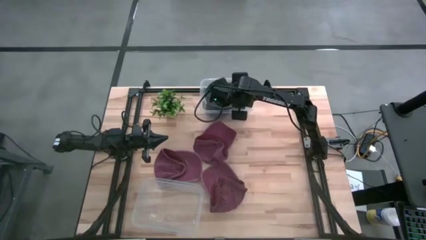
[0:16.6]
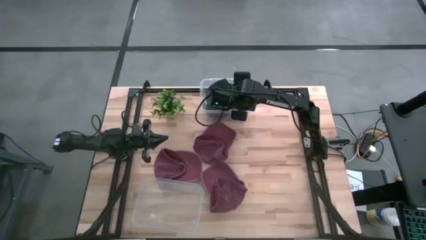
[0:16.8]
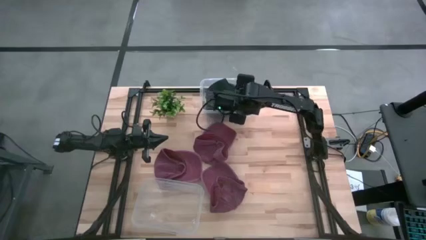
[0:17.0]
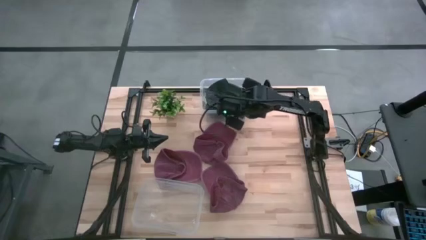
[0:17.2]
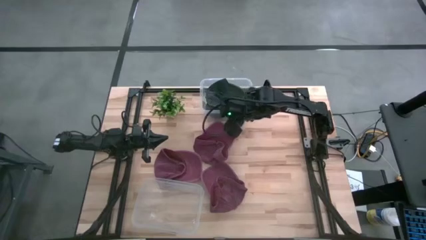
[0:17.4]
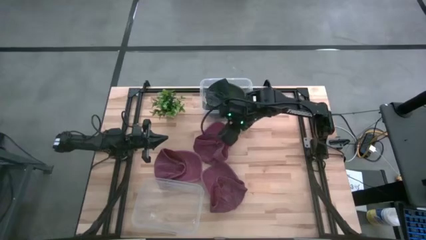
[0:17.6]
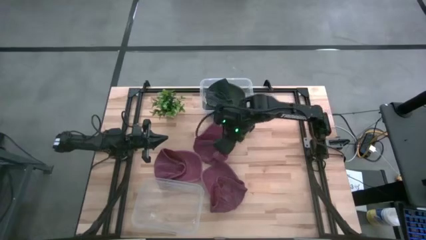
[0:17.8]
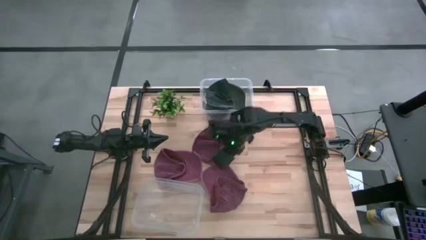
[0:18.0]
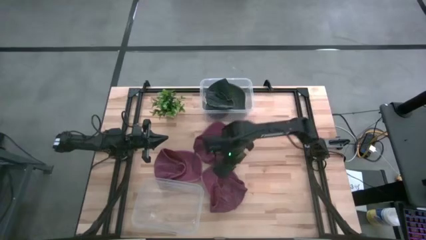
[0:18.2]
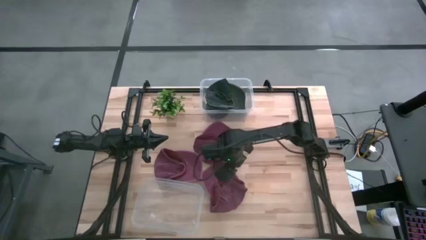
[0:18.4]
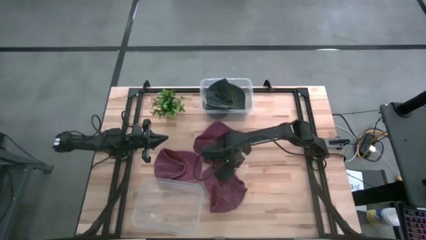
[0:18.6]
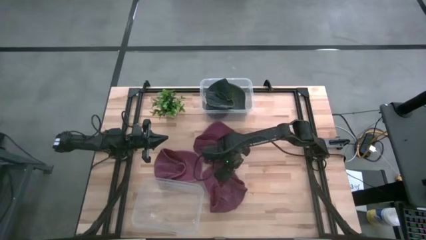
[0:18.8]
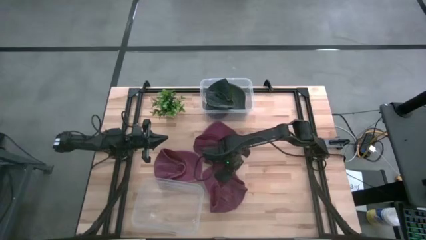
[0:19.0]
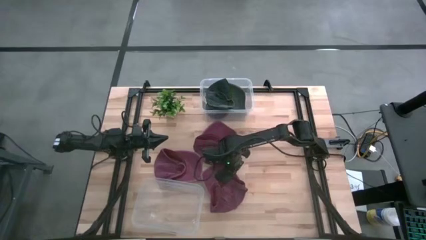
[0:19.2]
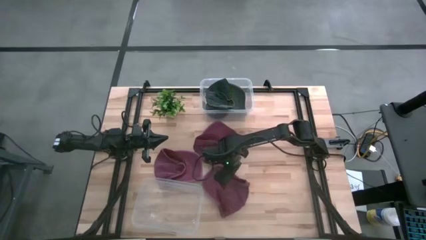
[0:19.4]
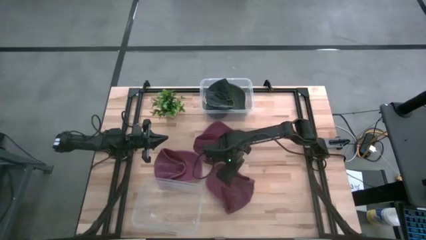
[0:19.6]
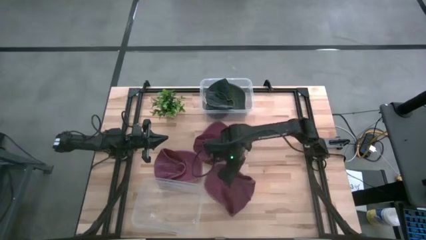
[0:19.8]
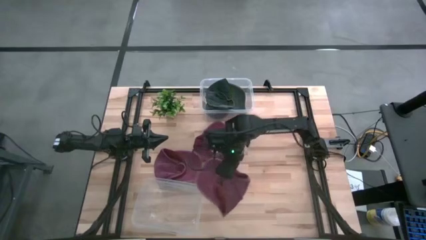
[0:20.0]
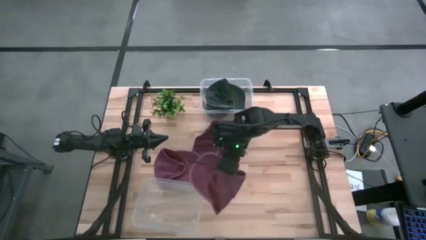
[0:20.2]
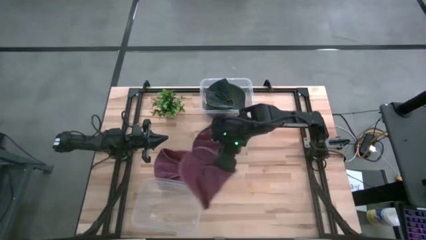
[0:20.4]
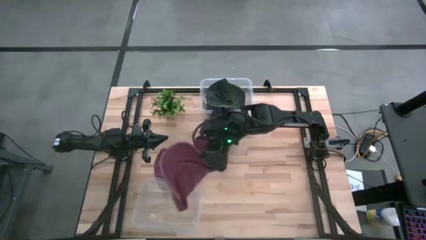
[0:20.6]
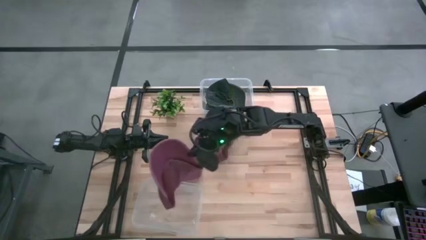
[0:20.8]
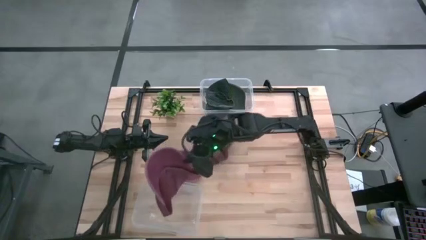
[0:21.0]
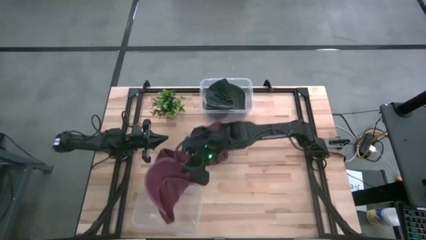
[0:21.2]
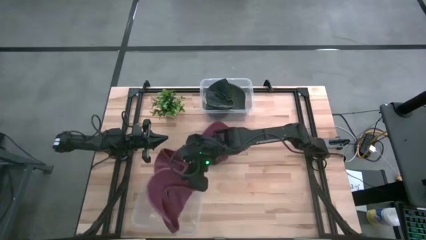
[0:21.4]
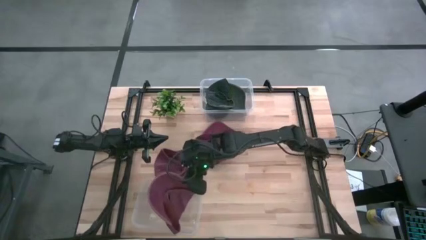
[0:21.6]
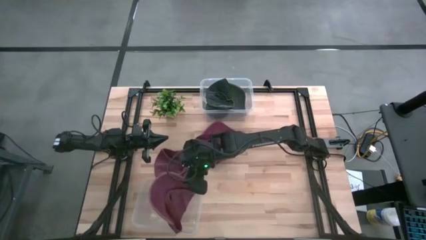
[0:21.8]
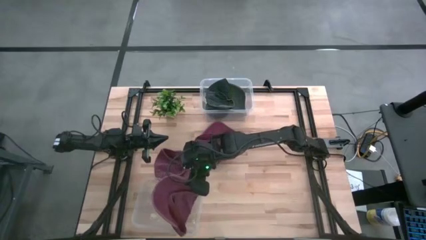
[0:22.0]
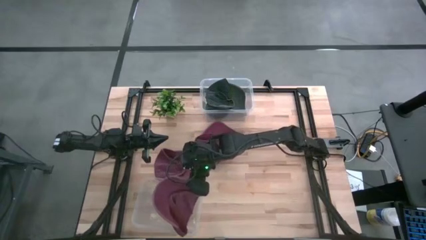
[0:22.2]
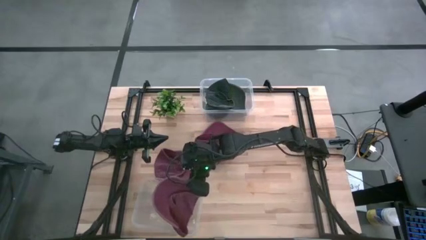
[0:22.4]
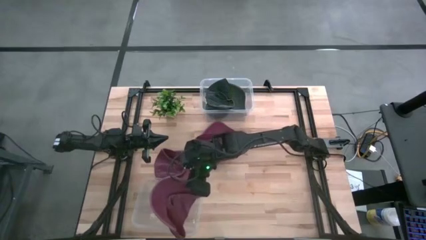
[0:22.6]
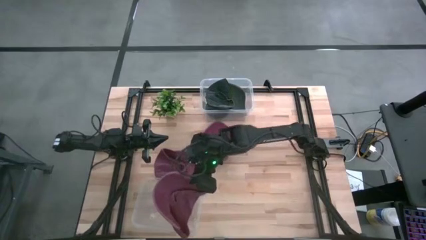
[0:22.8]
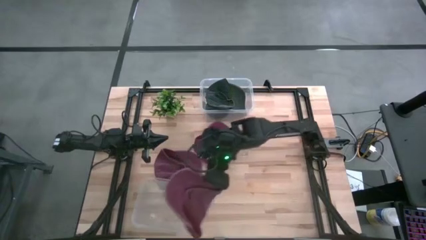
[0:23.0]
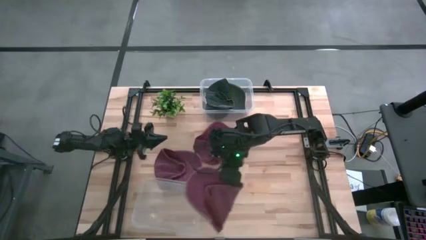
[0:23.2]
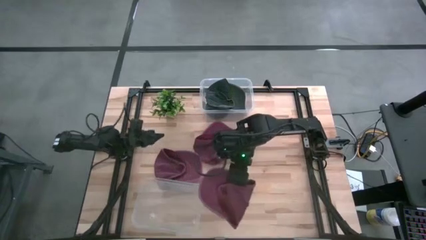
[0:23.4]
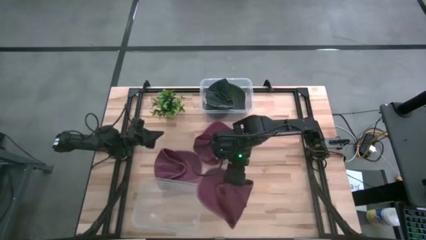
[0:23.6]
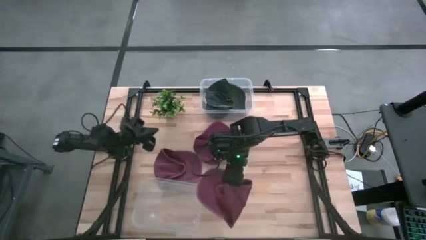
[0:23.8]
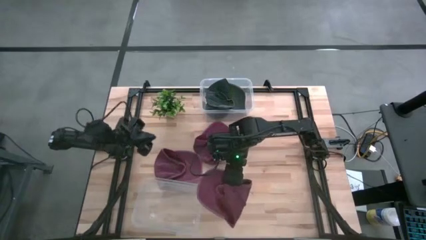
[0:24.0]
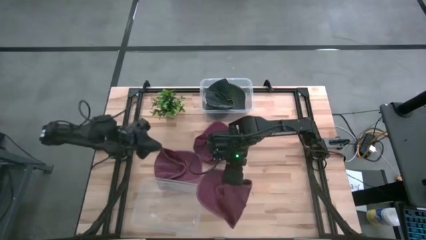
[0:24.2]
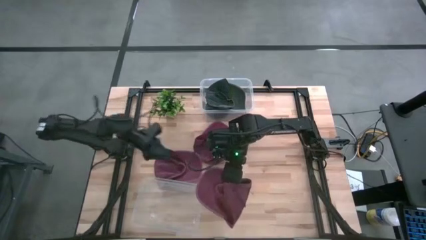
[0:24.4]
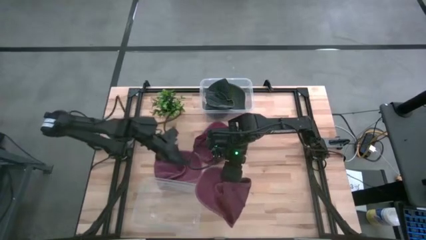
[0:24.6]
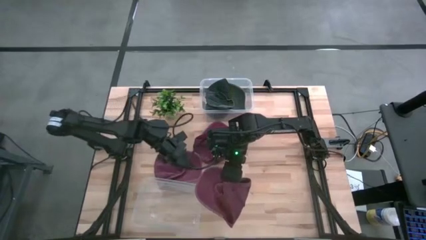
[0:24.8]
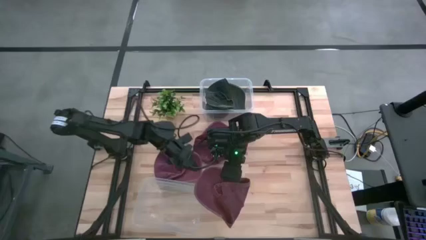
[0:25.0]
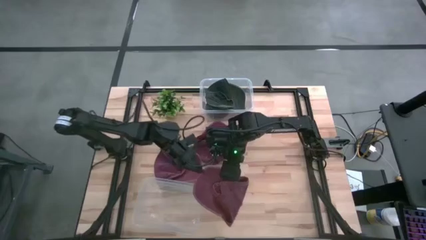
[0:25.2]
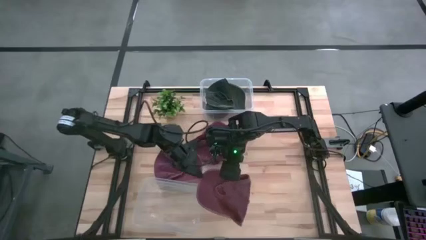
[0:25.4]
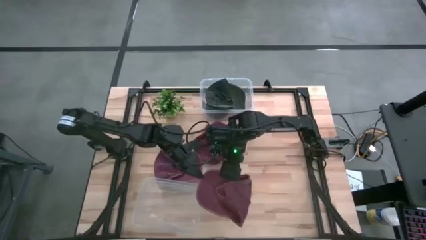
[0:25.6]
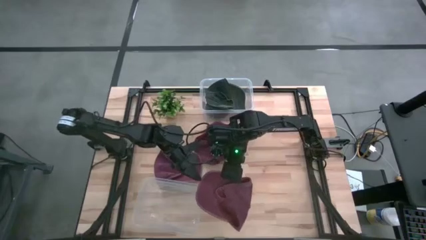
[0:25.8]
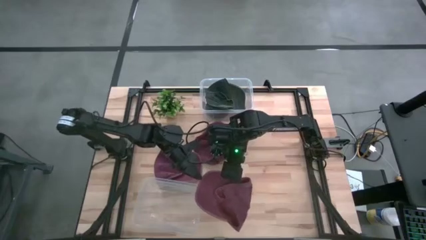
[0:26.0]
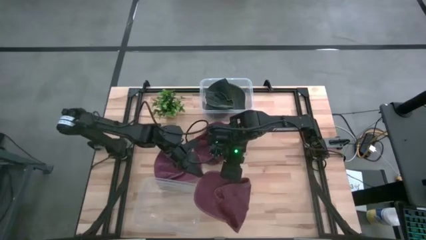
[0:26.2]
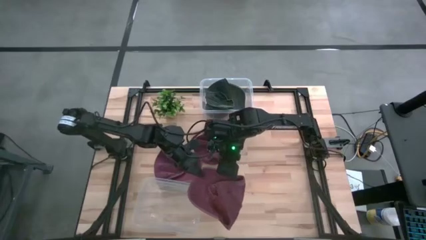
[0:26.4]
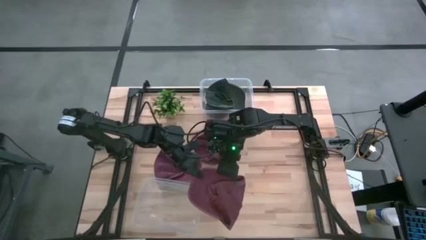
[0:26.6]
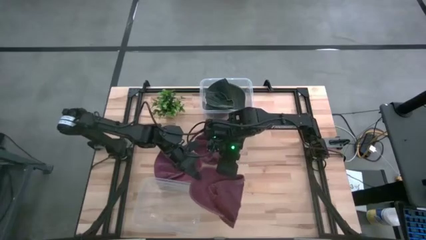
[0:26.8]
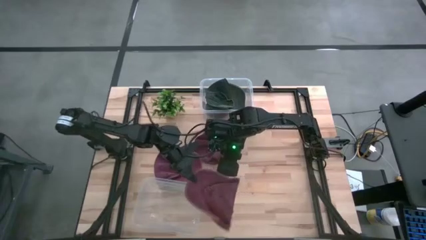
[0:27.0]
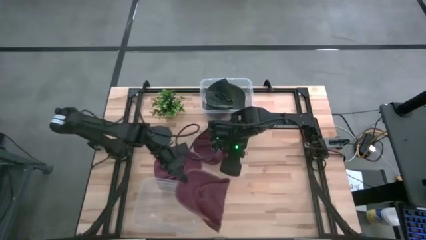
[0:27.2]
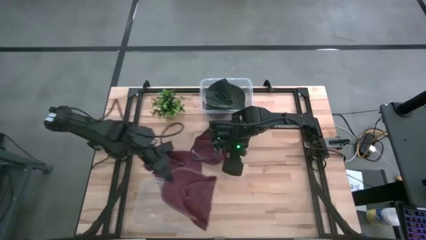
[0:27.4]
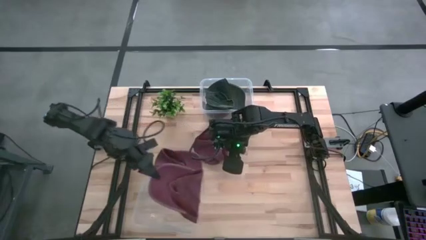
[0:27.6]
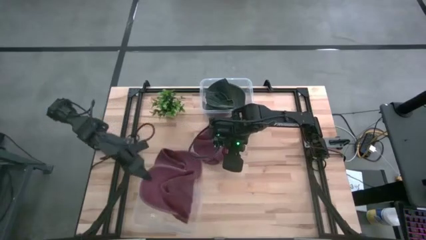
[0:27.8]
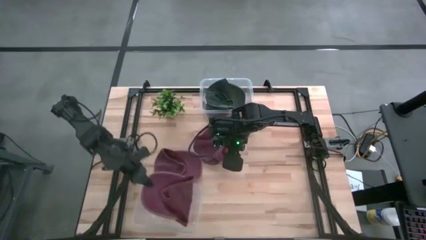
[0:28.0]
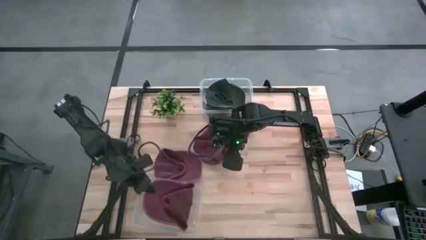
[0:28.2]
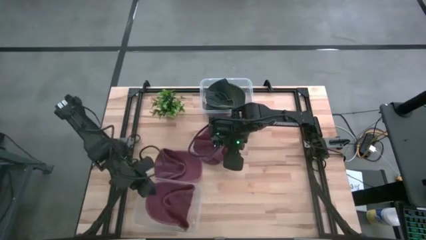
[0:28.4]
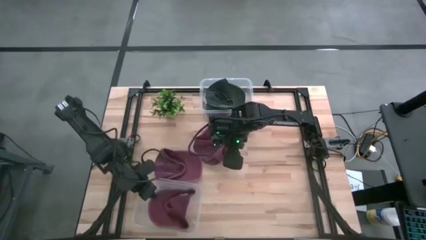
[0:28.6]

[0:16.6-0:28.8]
Task: Pick & Place hat
Put the bottom right red cap into the bottom transparent bin

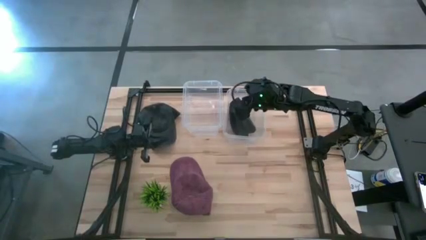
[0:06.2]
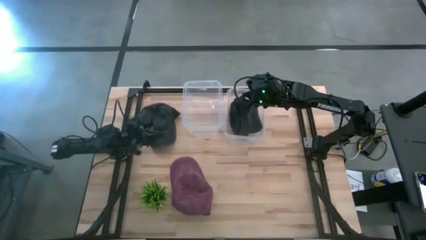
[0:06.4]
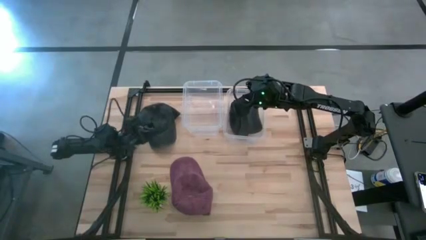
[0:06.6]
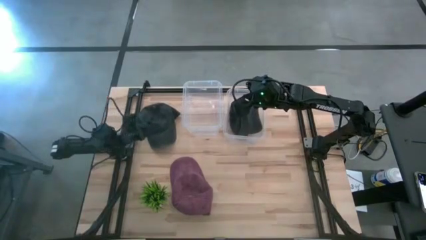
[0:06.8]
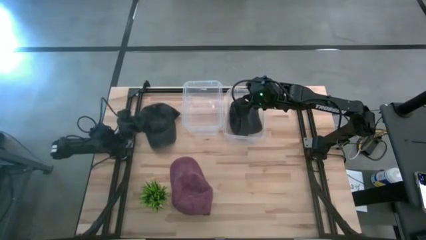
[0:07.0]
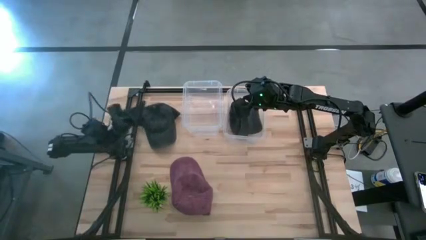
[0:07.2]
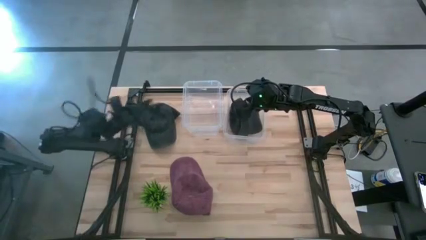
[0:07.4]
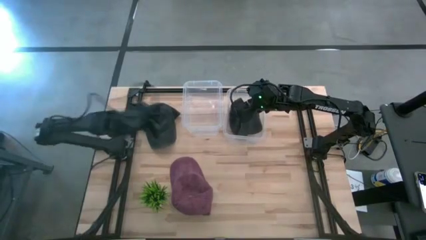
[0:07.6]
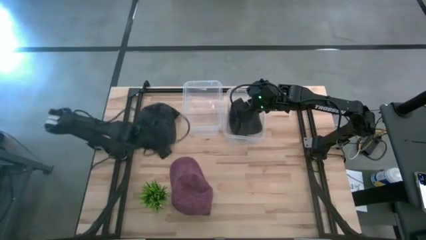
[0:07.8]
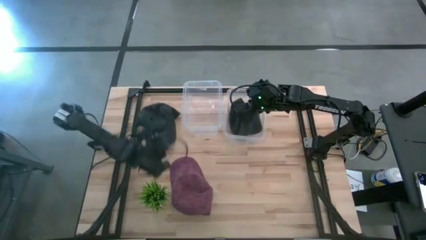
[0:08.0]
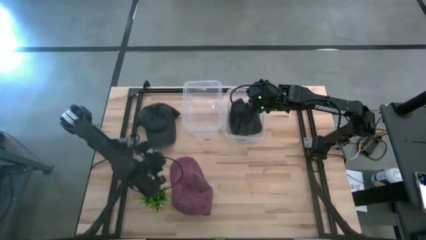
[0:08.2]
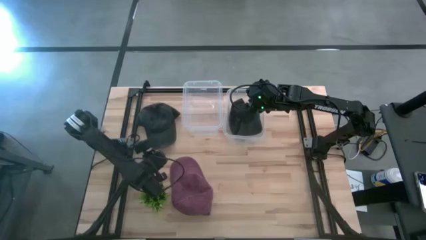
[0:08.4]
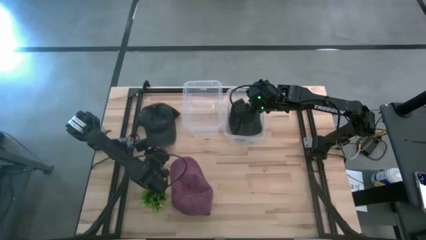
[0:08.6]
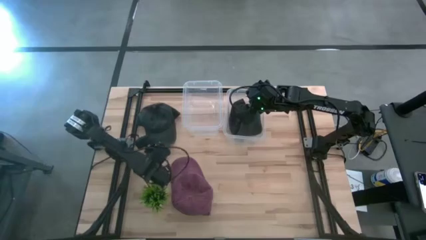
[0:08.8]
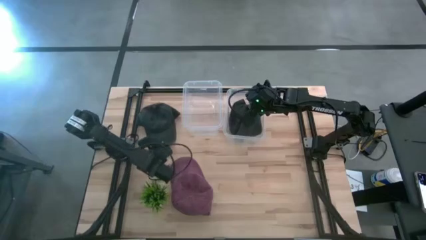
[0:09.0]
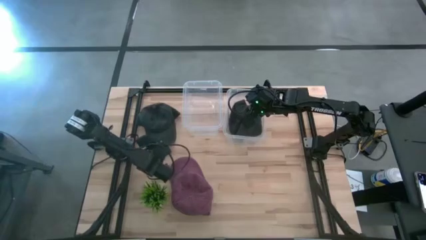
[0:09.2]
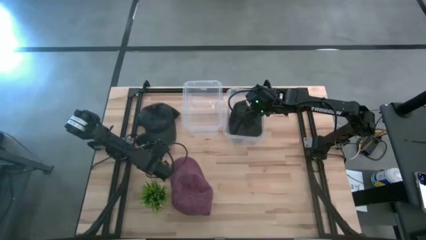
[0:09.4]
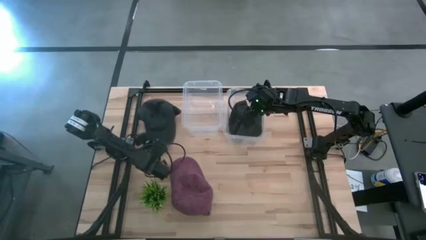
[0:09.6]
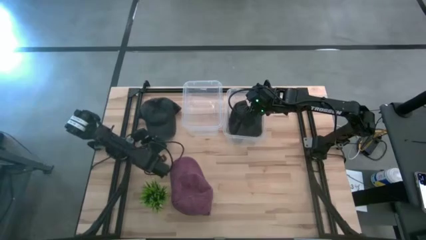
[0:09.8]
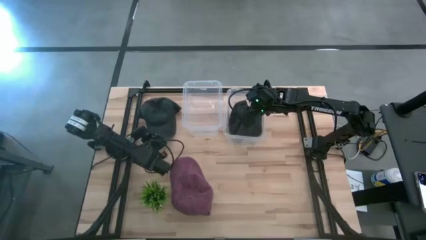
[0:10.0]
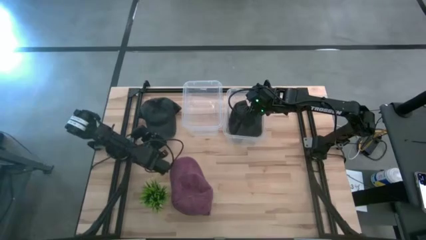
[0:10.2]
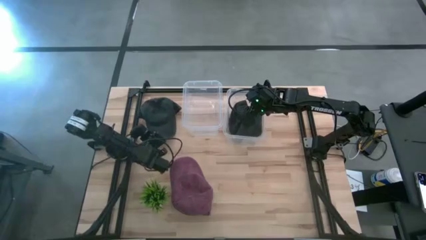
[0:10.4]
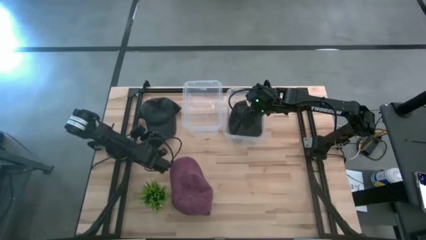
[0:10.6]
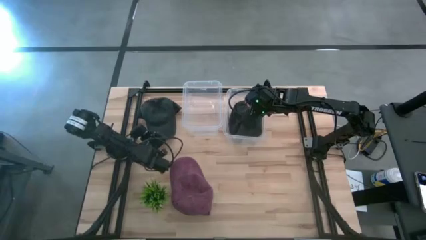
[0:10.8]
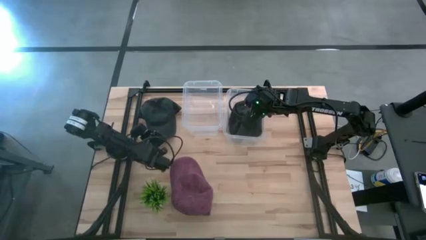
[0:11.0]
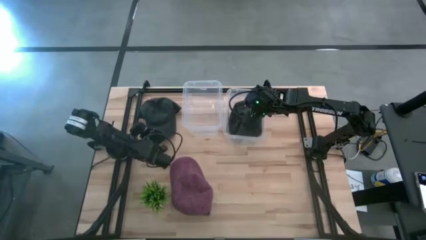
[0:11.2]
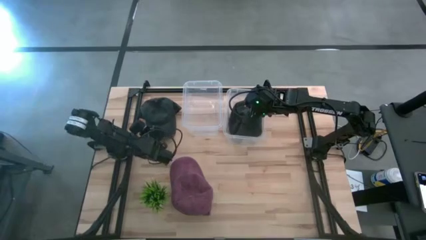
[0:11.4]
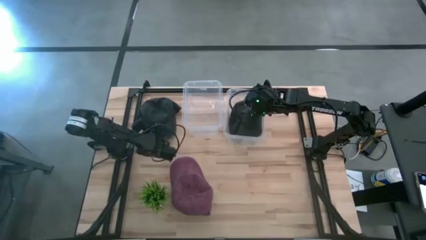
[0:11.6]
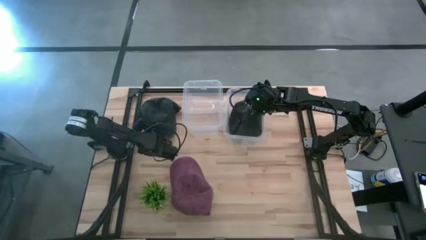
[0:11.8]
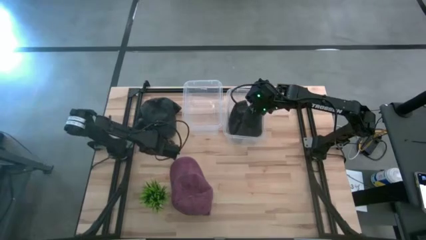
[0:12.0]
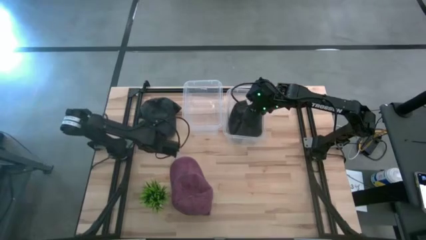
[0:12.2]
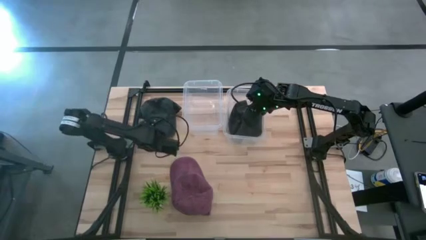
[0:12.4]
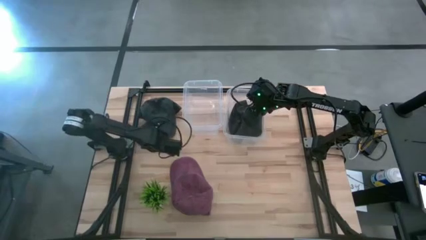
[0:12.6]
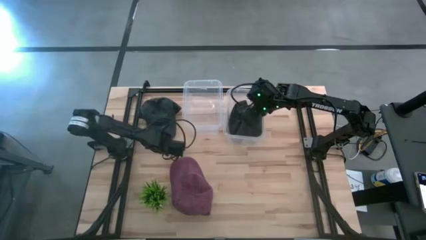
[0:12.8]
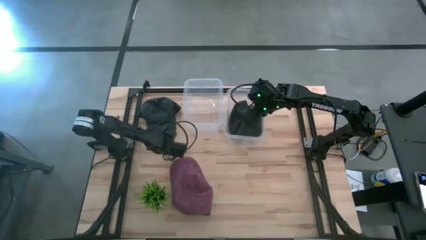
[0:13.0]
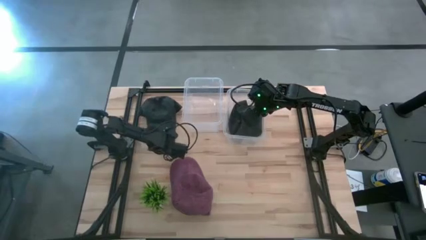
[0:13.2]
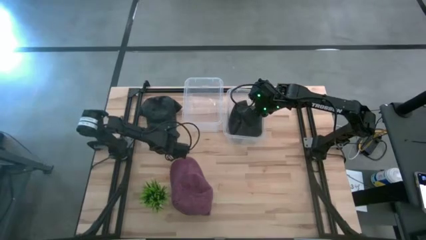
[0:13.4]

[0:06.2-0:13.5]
Task: Pick & Place hat
Put the black cap into the right transparent bin
